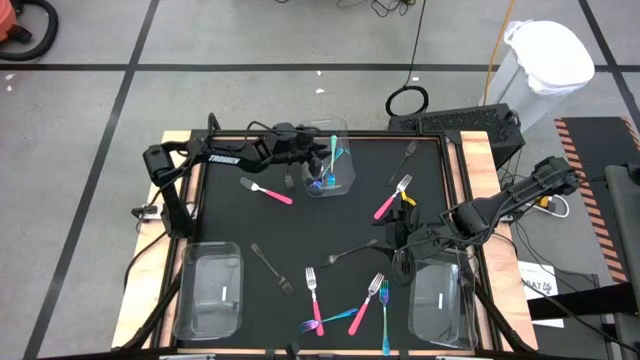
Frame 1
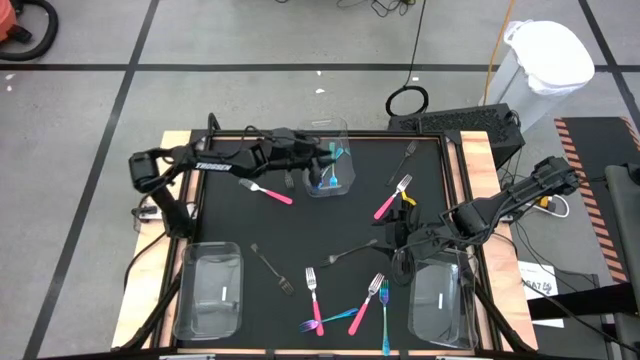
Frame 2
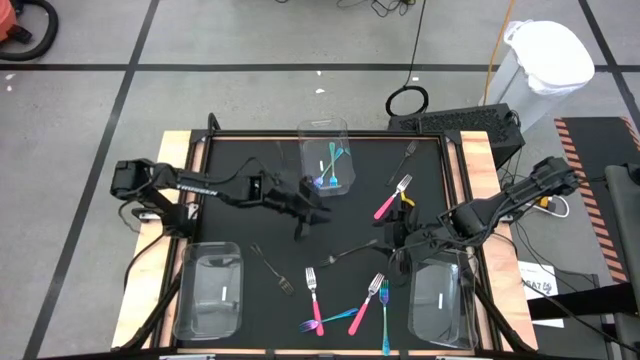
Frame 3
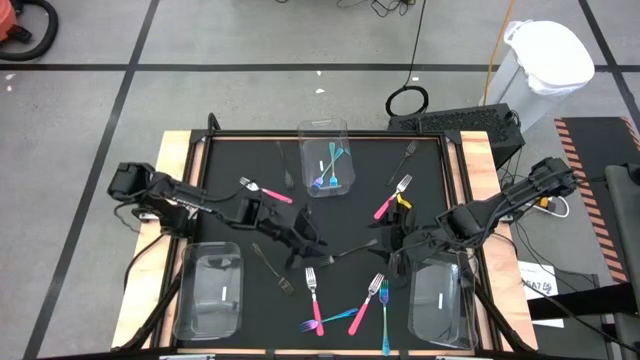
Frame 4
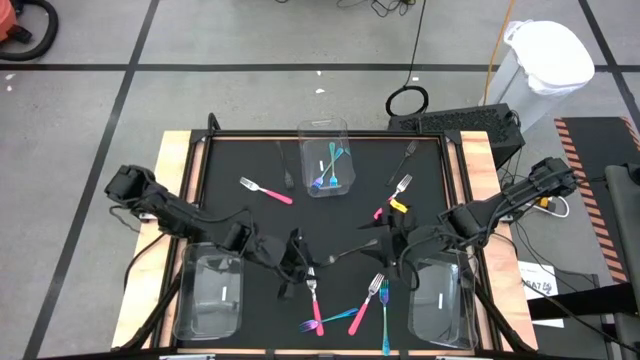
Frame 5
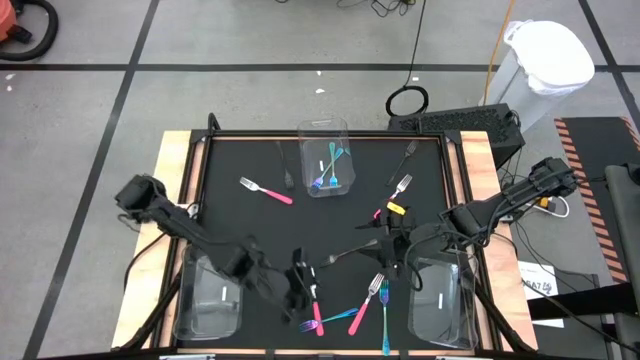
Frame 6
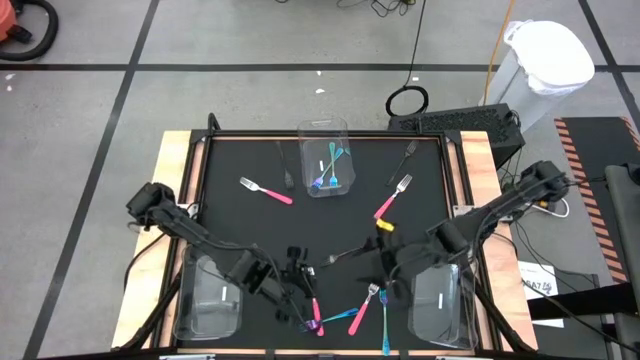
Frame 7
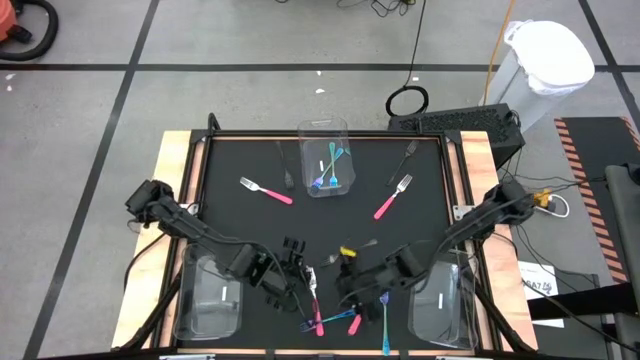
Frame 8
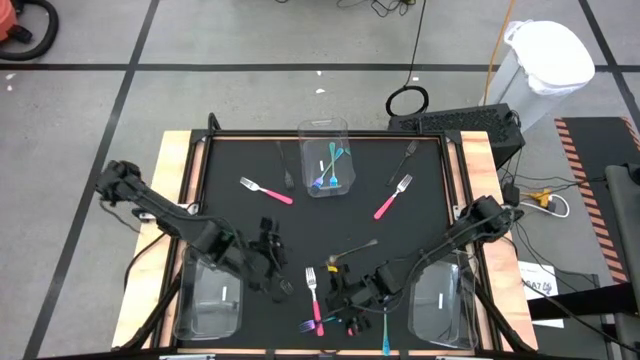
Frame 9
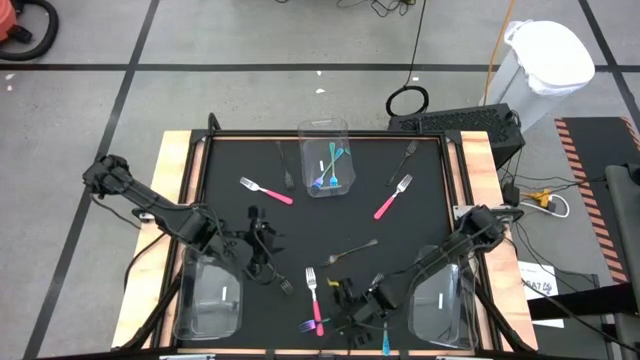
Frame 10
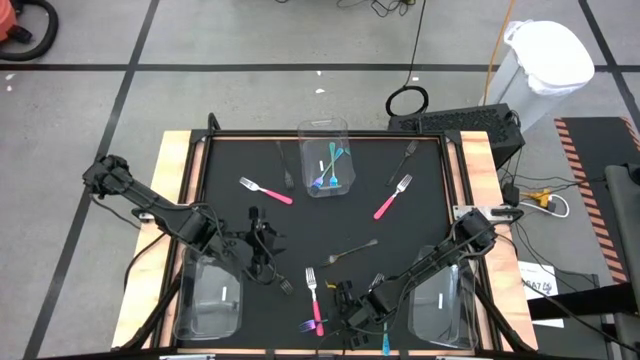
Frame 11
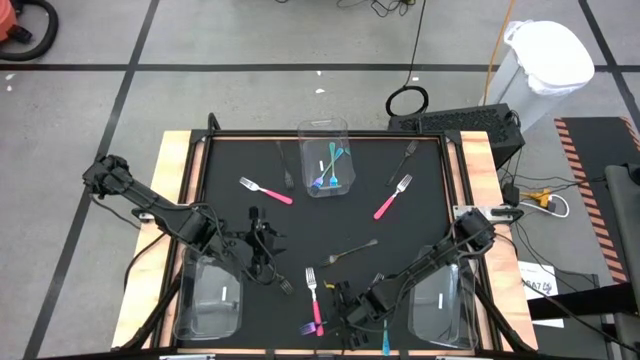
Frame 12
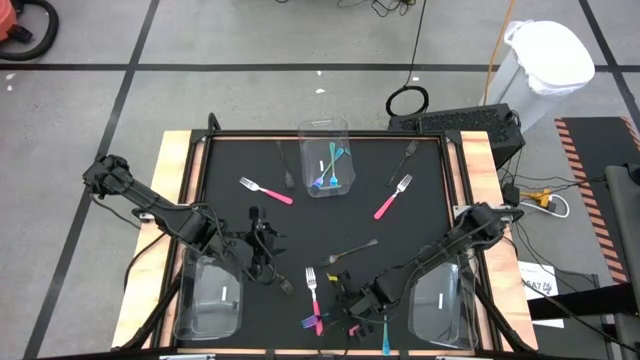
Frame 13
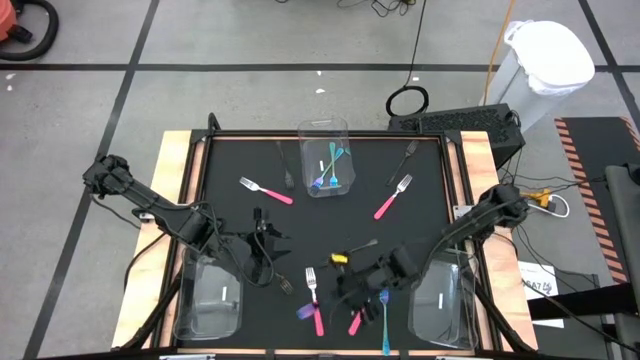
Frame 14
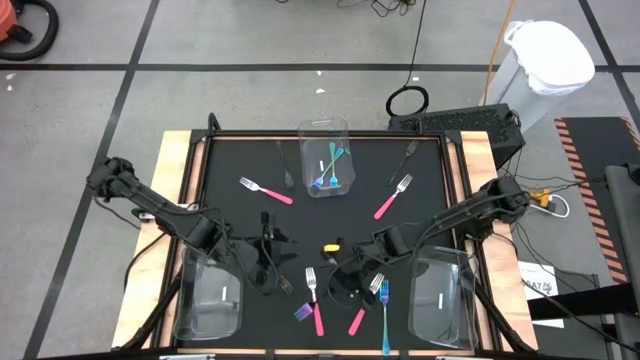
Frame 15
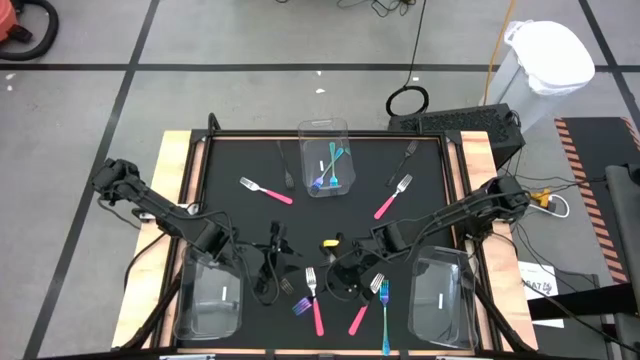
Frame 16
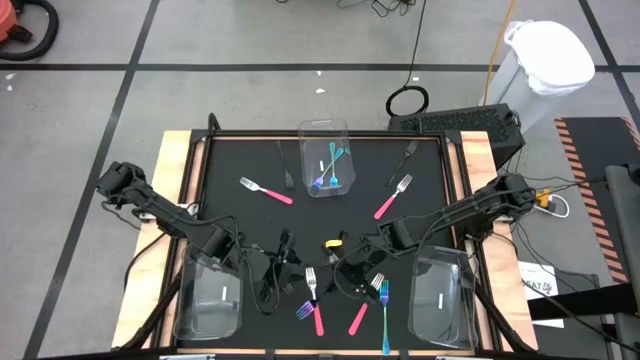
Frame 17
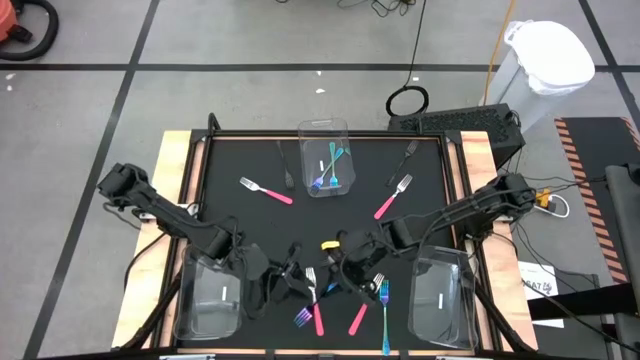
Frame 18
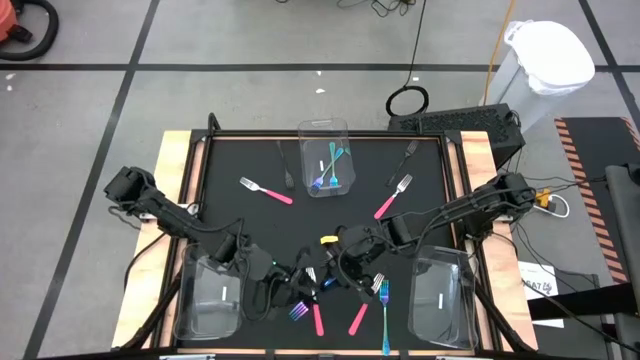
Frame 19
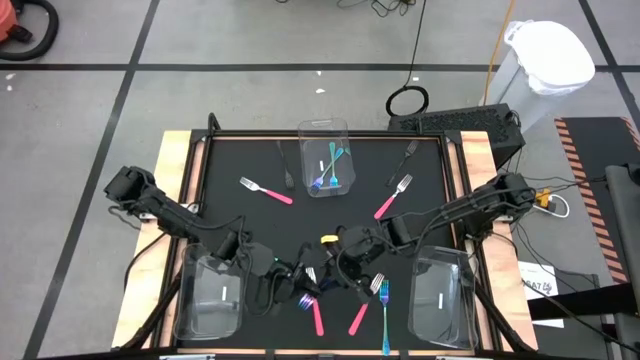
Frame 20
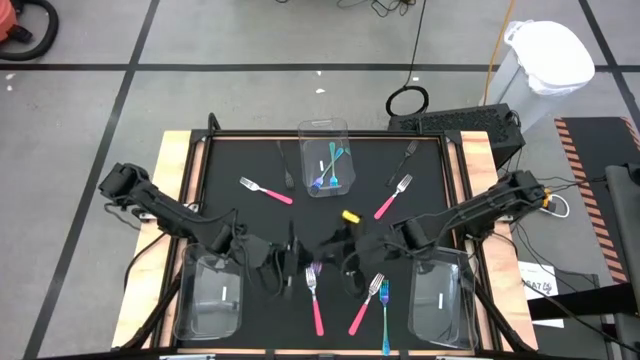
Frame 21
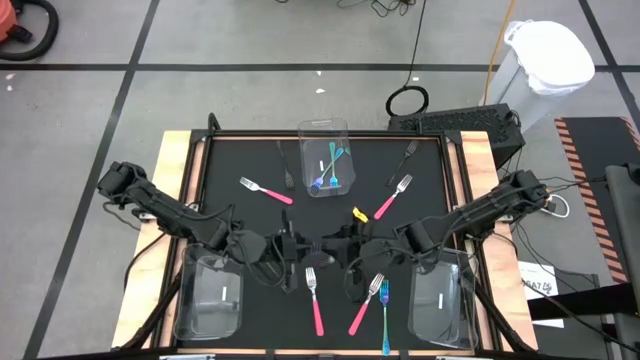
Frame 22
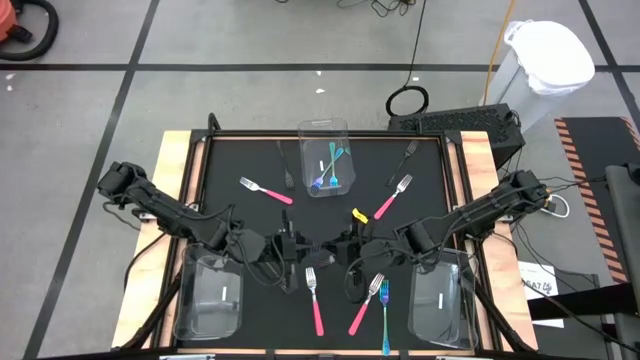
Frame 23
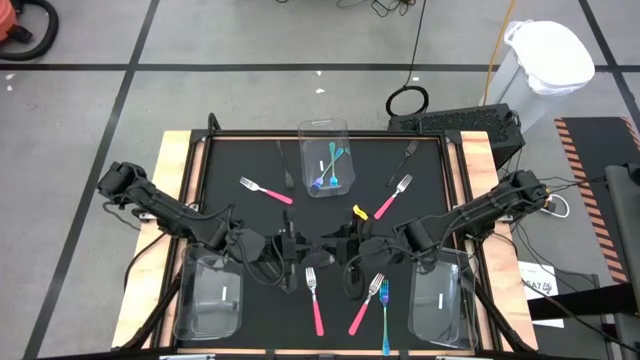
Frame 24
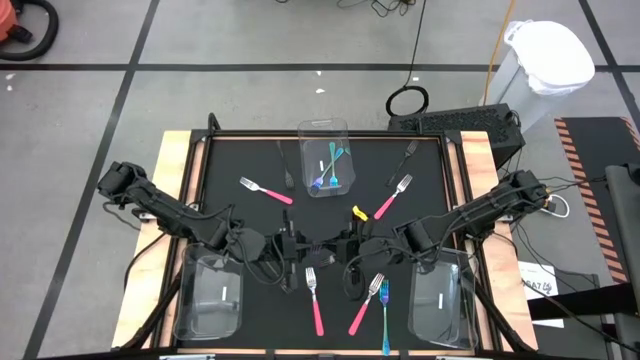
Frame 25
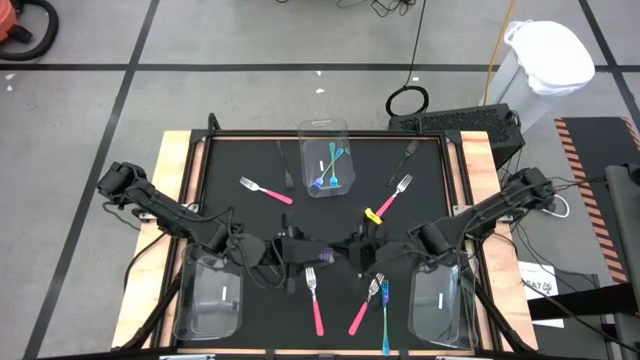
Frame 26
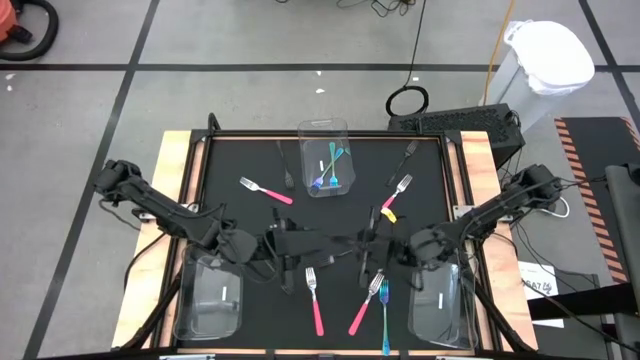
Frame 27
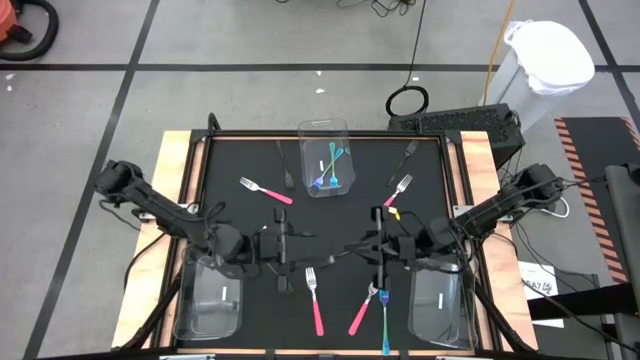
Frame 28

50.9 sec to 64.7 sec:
Task: Sort silverware by color (type)
Put the blue fork into the top transparent bin

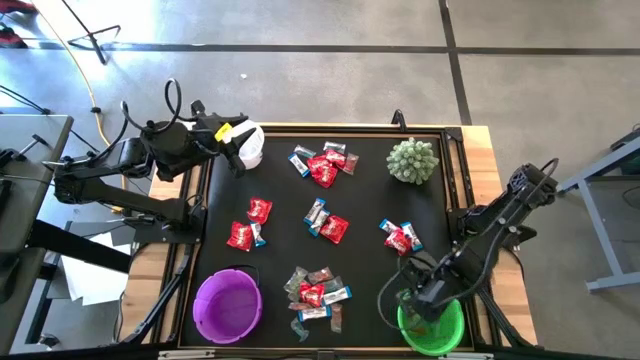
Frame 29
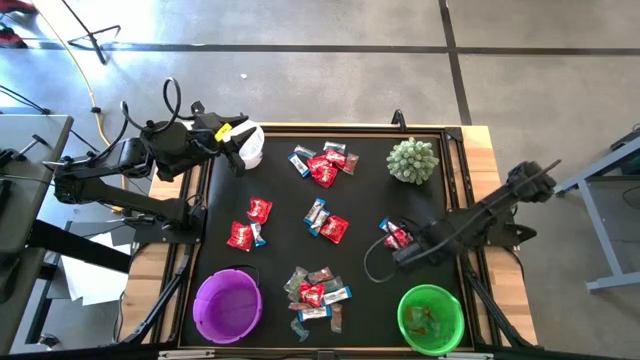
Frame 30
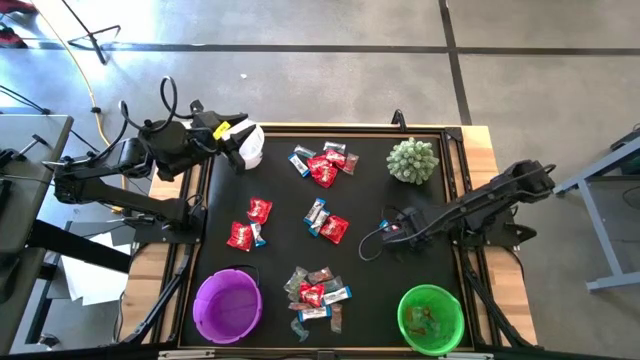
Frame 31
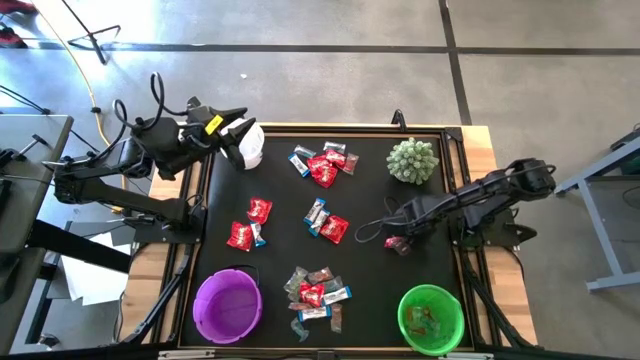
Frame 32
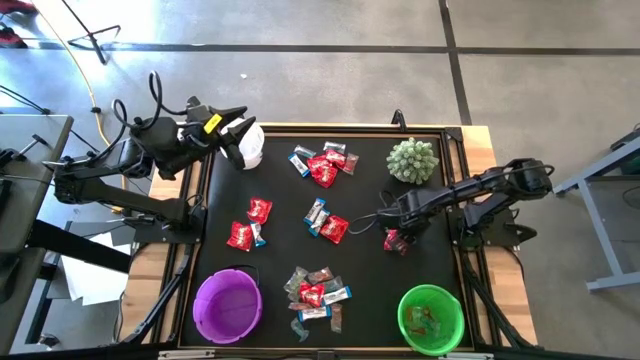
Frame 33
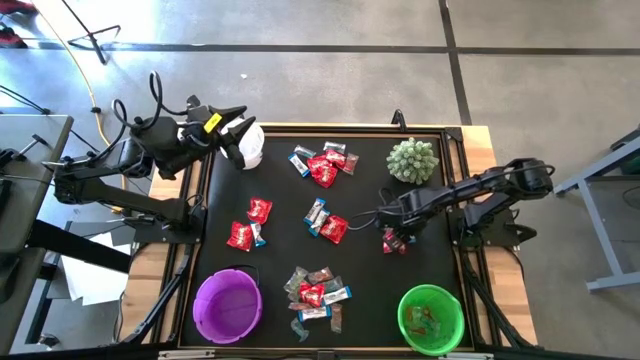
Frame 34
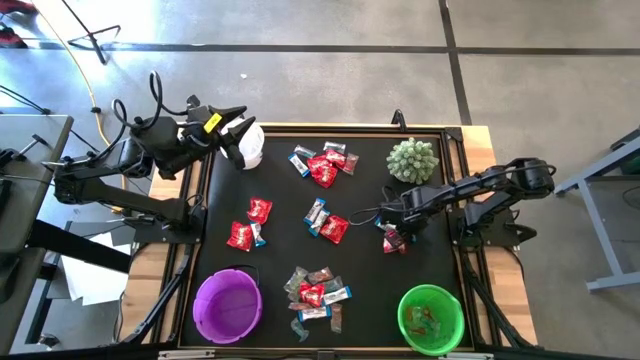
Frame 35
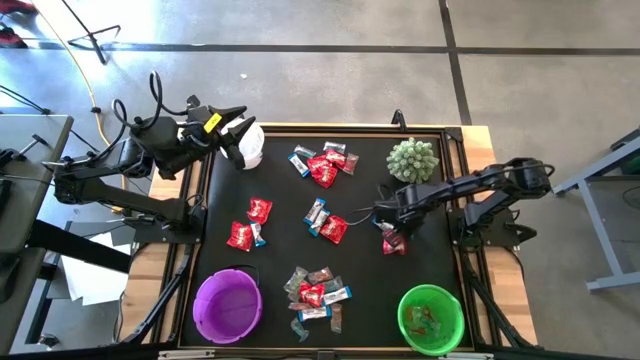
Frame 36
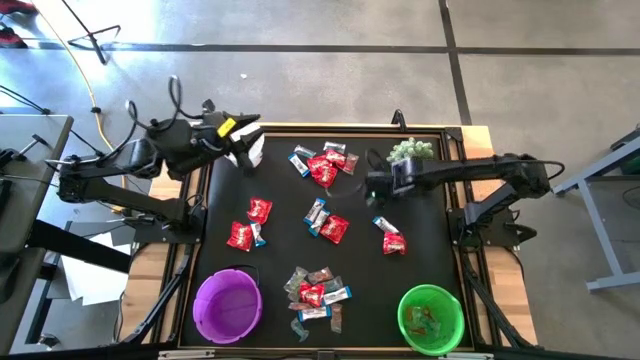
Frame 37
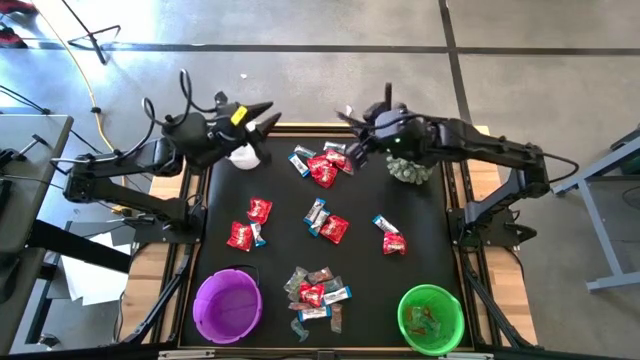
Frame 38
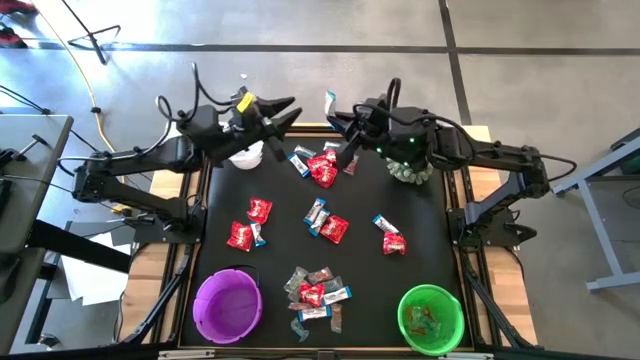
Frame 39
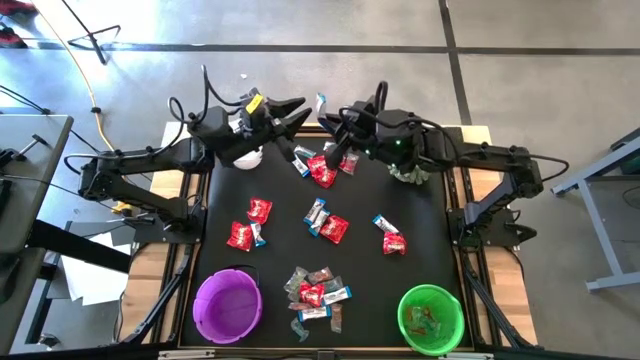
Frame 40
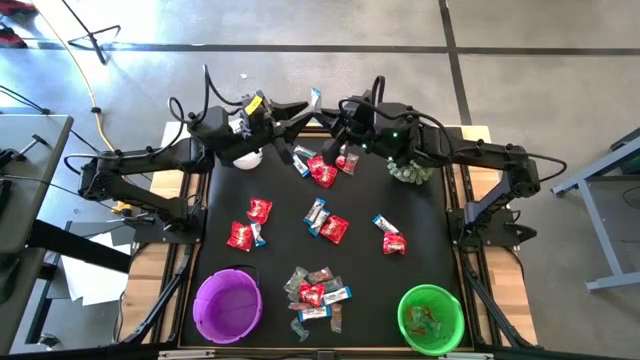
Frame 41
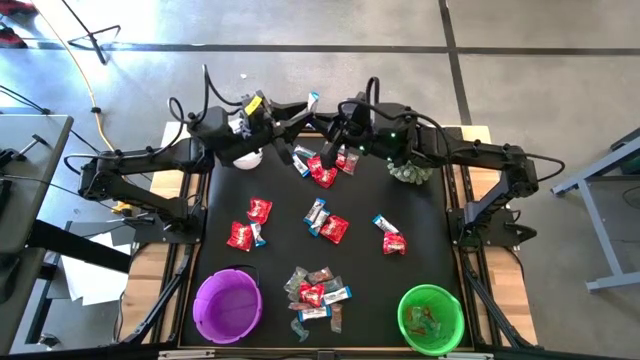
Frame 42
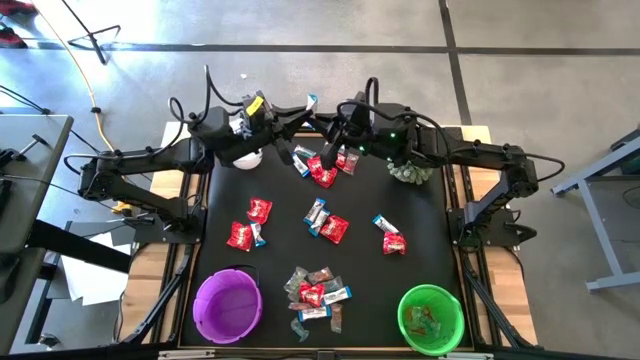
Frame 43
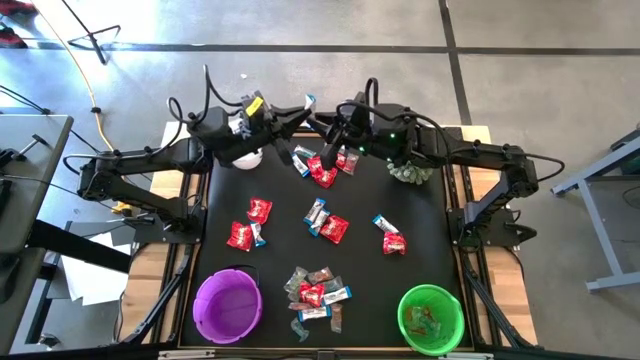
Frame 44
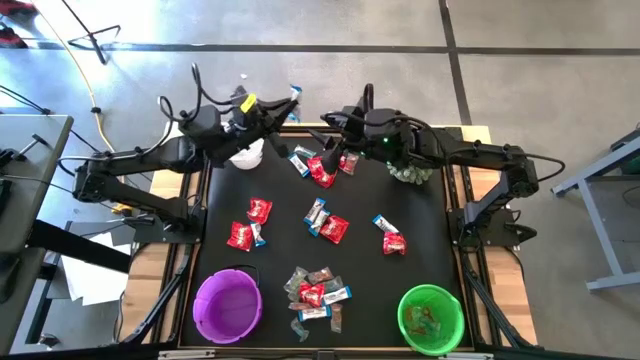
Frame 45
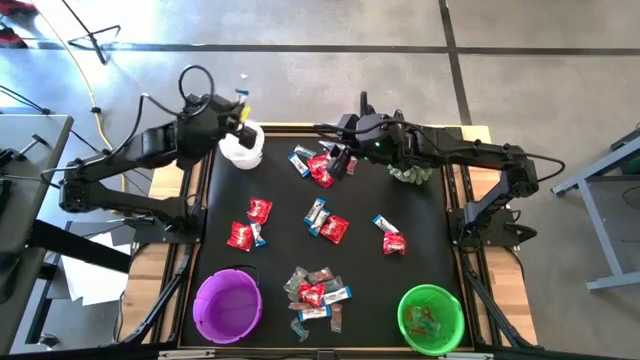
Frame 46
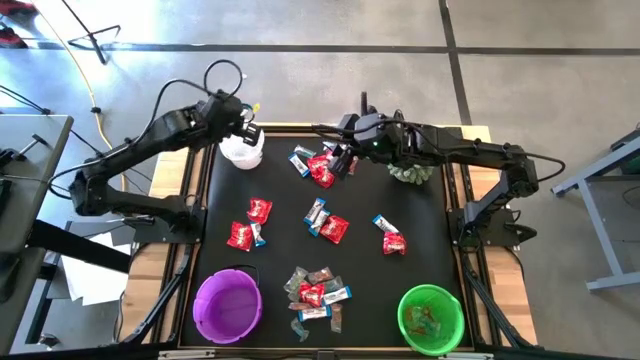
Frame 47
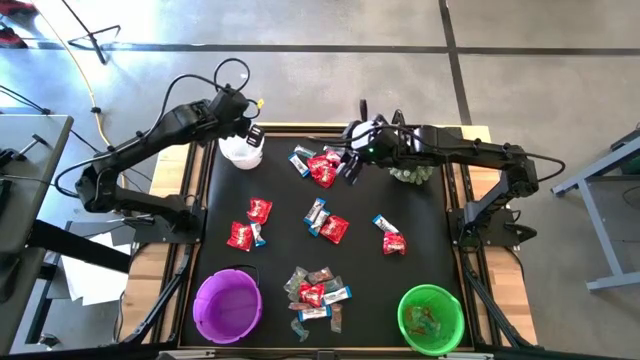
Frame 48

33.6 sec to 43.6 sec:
Task: Sort candy
Put the white chocolate into the white bucket
